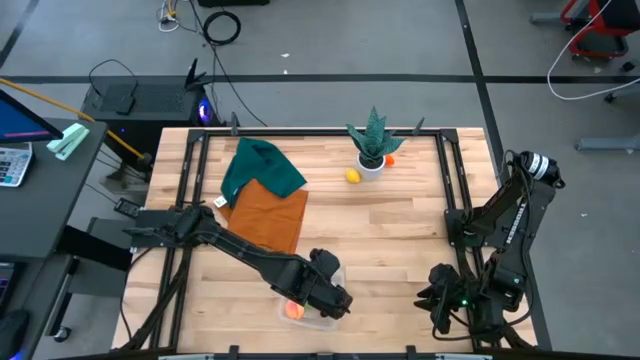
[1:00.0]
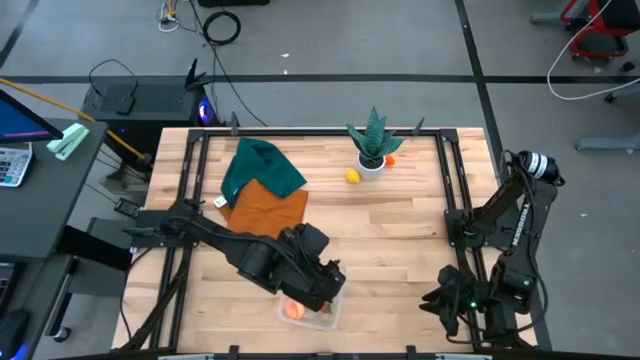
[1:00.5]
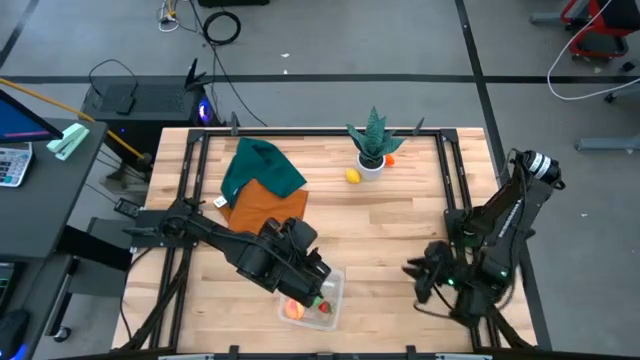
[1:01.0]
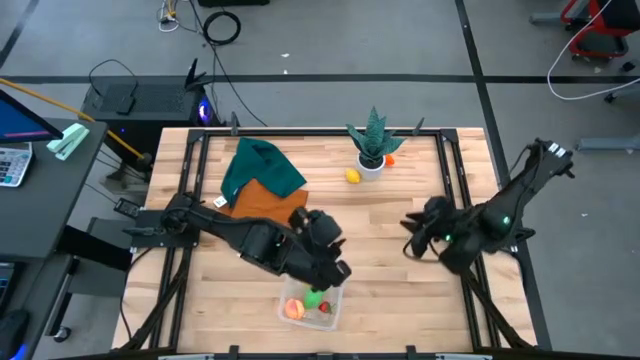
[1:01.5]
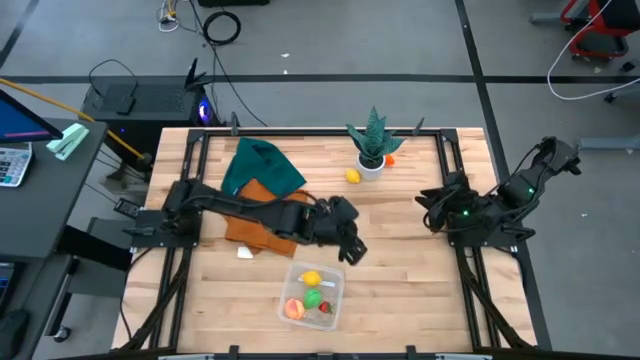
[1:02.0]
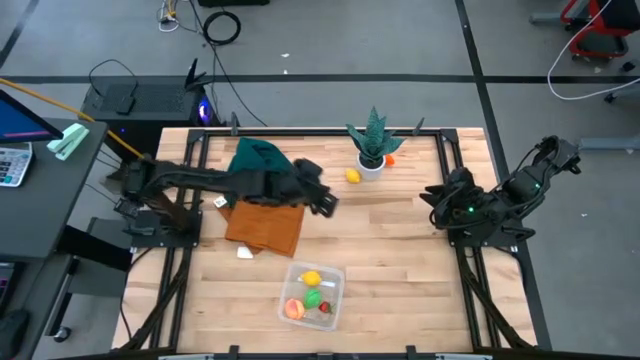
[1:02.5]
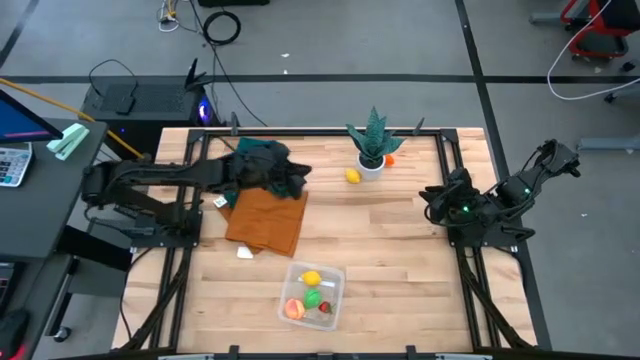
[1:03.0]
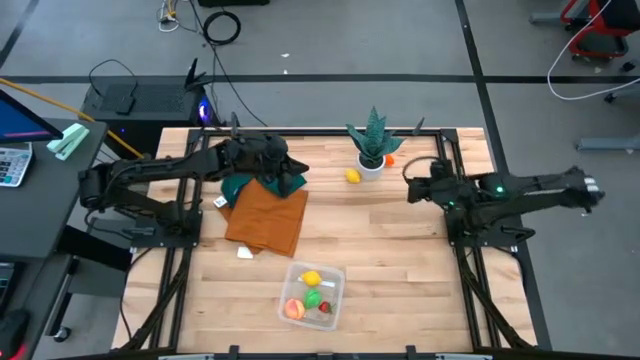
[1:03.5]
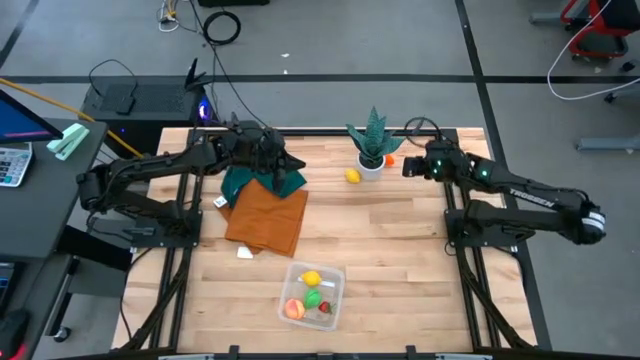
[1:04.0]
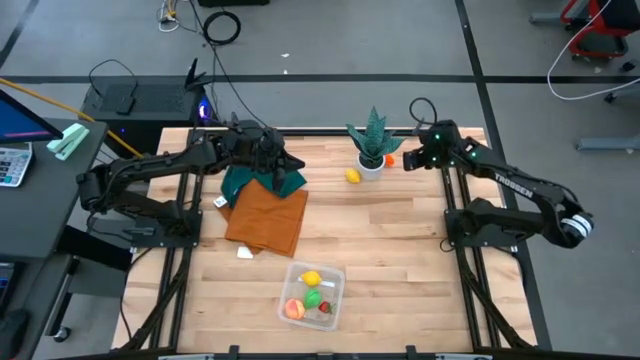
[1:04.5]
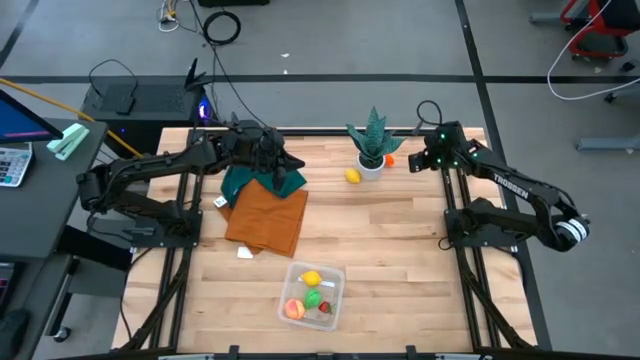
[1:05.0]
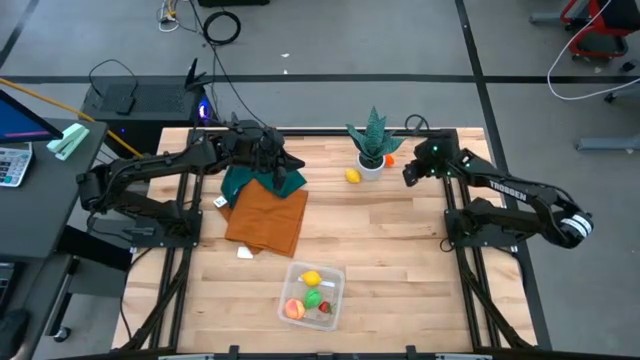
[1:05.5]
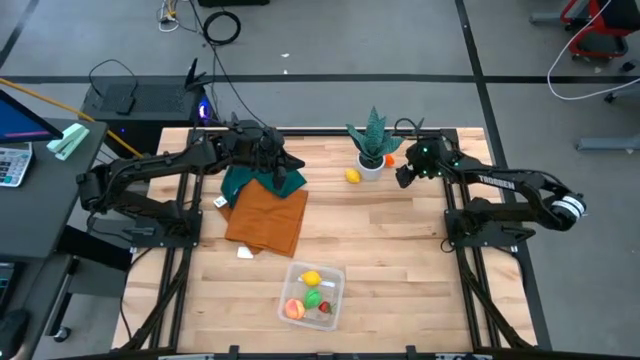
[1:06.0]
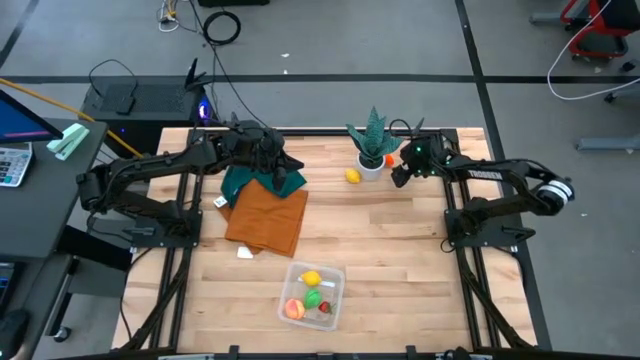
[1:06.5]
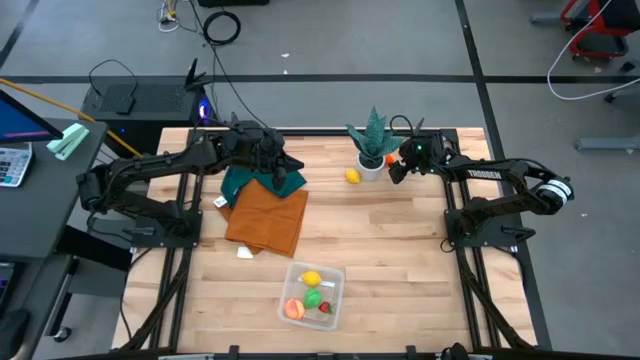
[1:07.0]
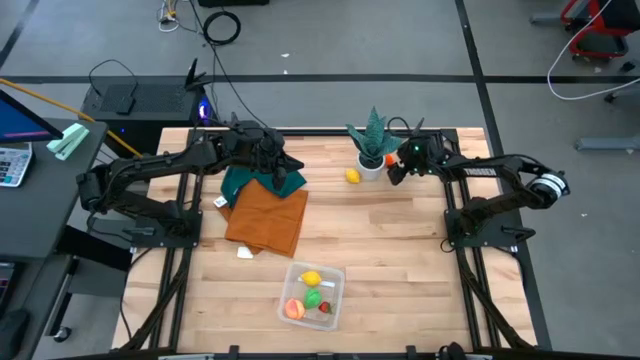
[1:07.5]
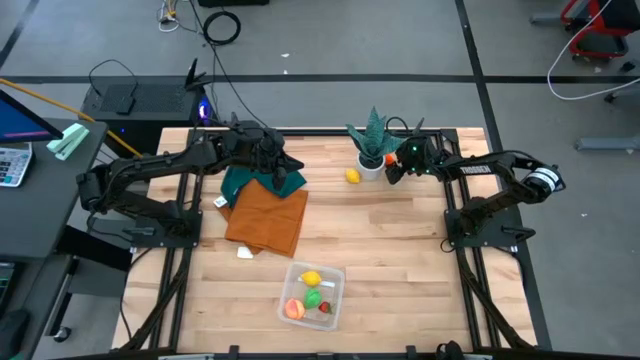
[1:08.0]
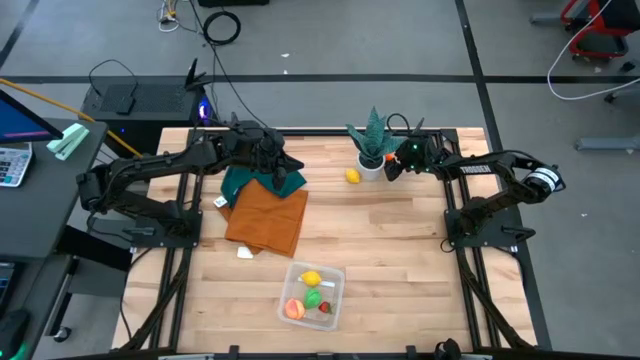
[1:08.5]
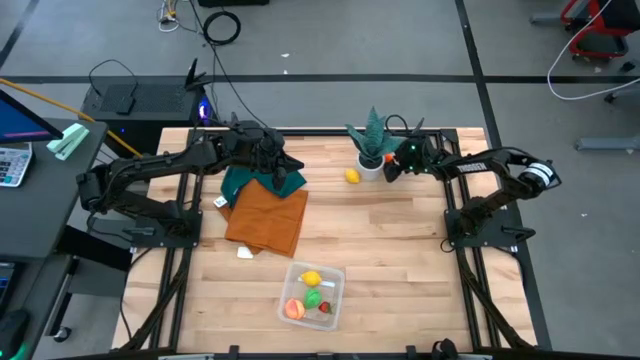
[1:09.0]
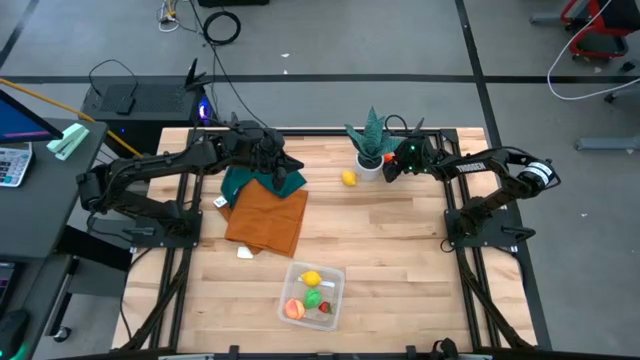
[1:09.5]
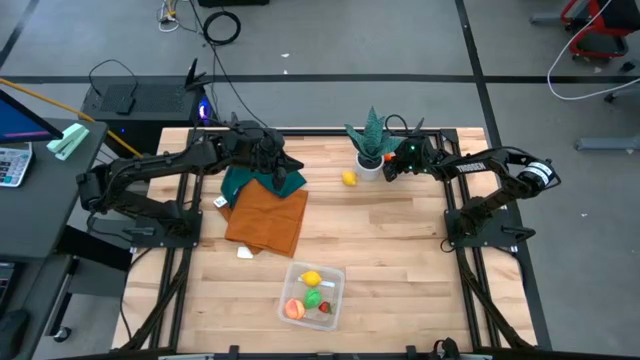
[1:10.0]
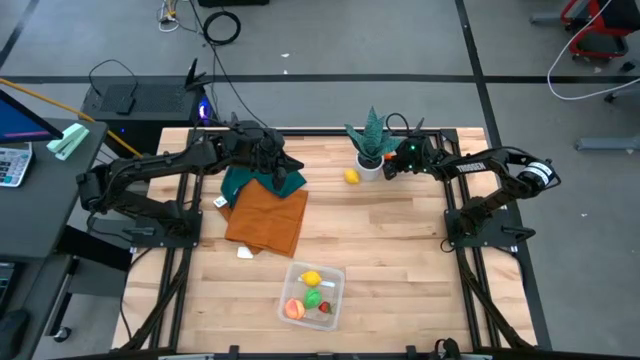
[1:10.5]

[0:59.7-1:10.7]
Task: Pick and placing Produce into tupperware
Put the orange carrot into the transparent bin

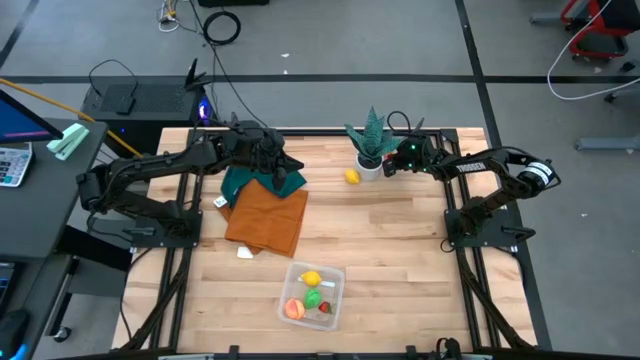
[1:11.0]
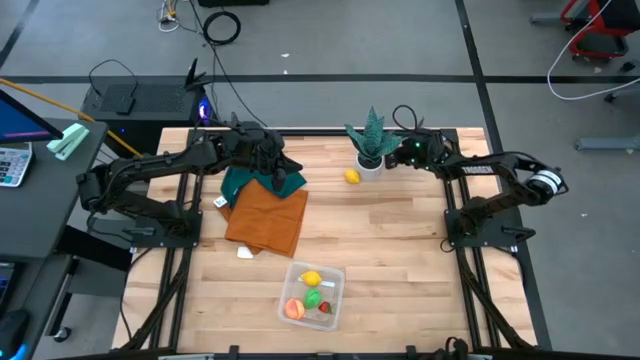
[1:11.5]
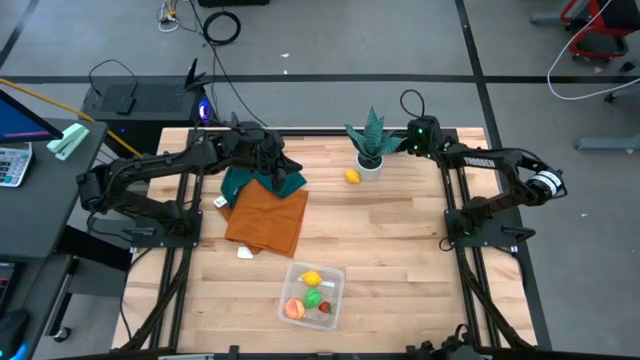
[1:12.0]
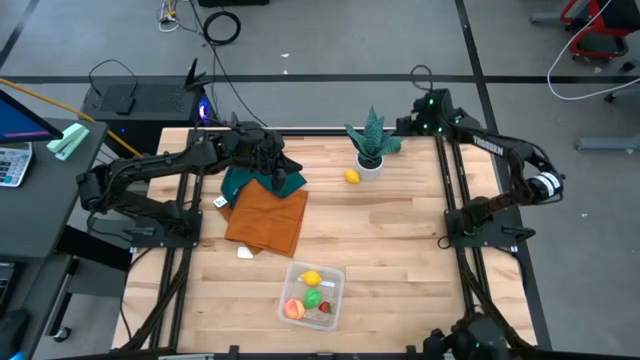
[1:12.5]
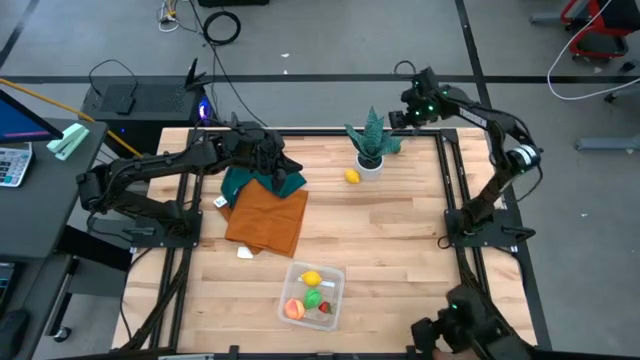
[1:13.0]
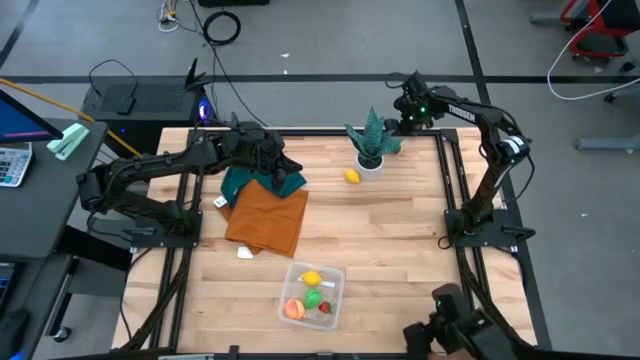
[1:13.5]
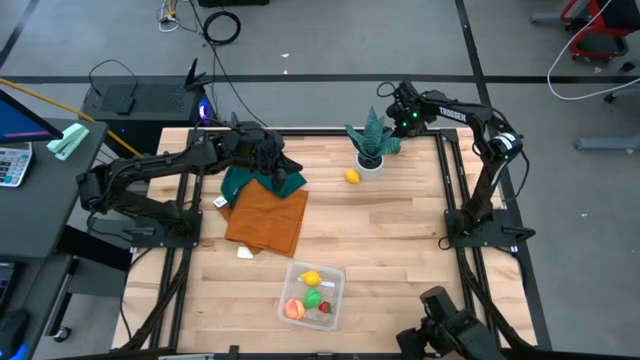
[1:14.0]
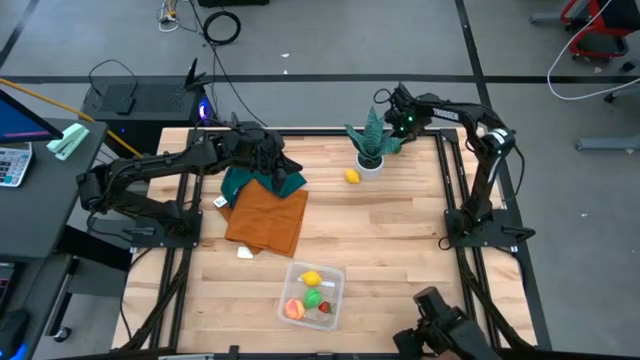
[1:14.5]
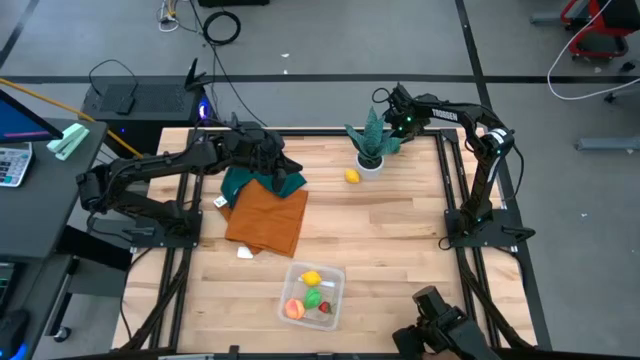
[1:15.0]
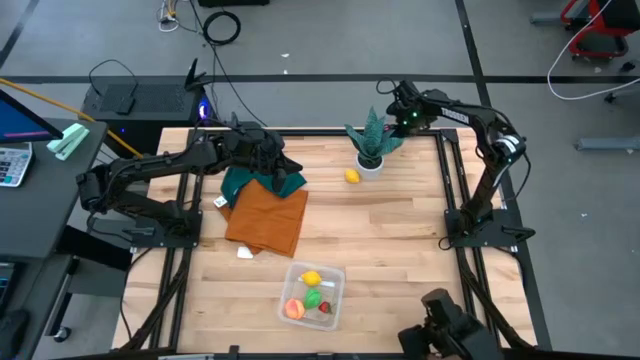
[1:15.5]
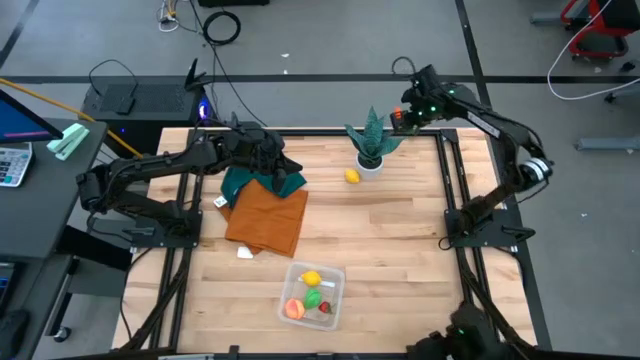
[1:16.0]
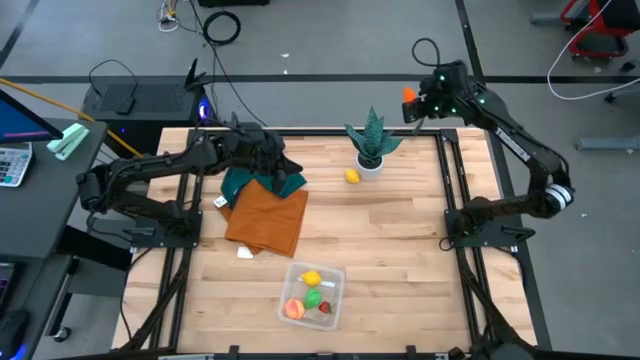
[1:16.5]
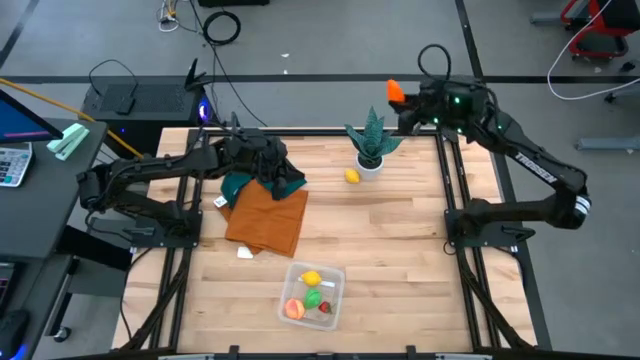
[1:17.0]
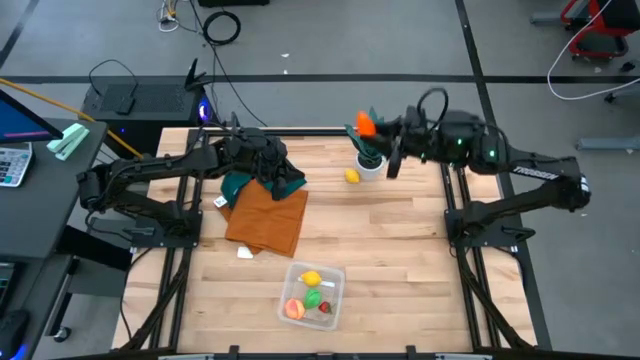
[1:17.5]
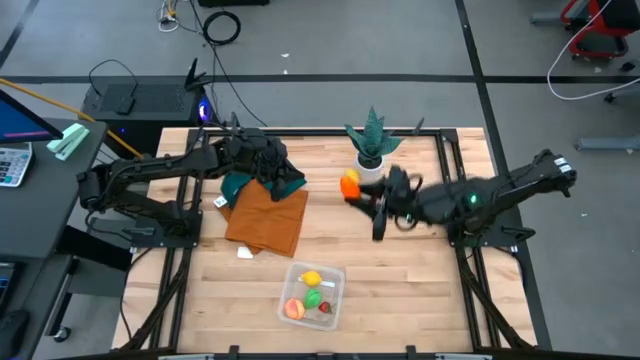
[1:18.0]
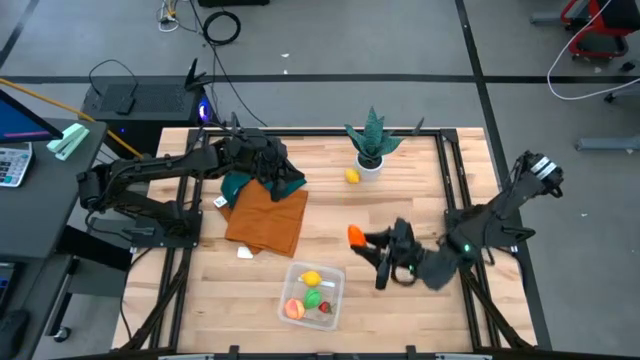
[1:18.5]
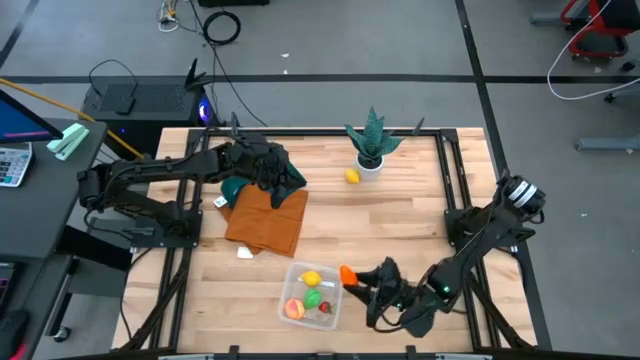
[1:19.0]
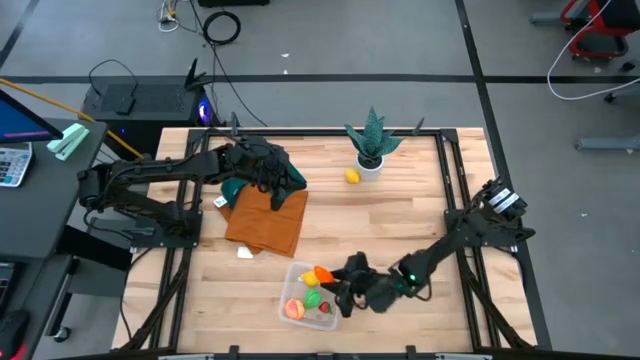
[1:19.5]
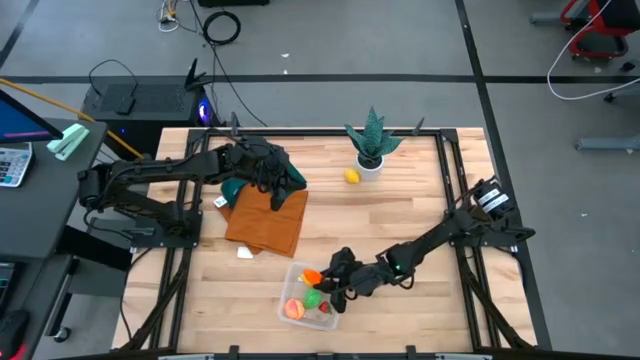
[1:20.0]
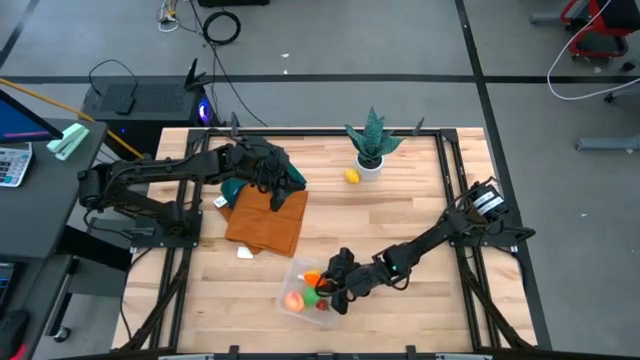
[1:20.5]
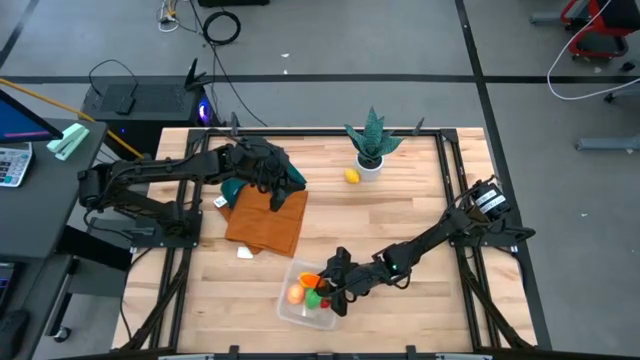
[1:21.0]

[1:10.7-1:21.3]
Put the orange carrot into the transparent bin

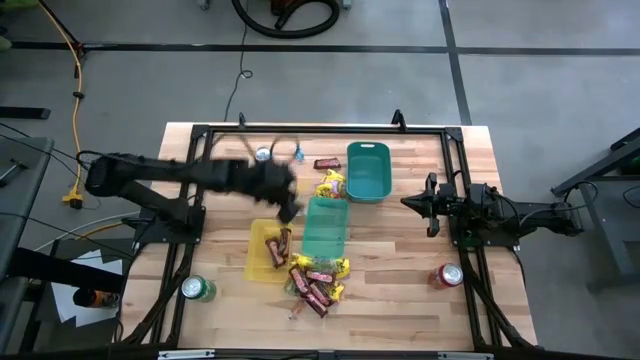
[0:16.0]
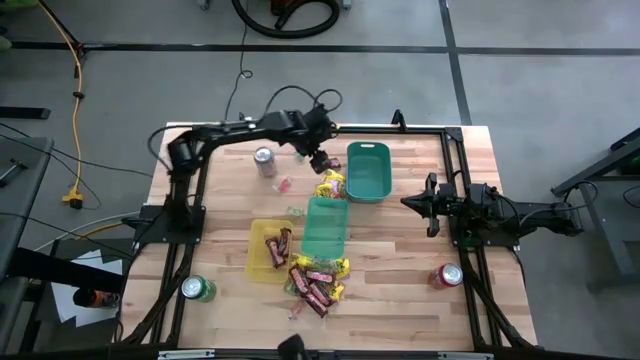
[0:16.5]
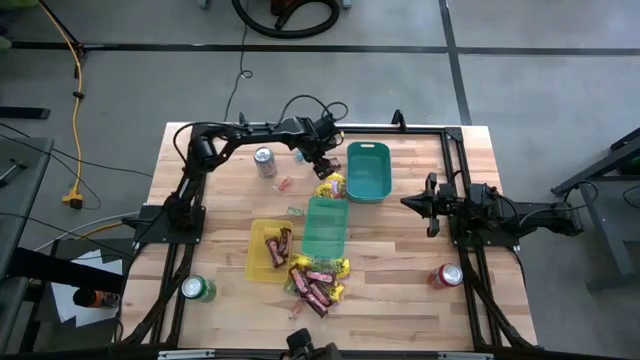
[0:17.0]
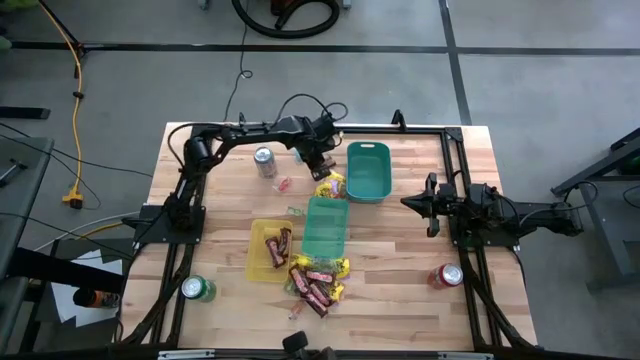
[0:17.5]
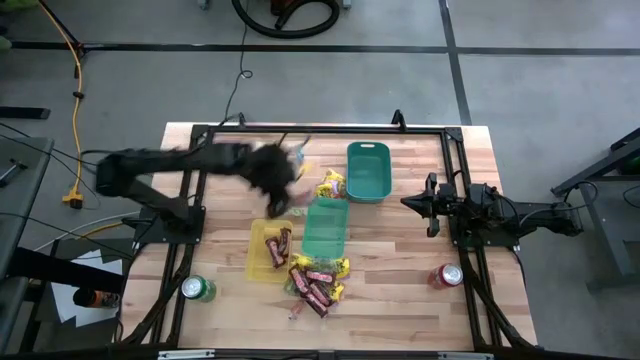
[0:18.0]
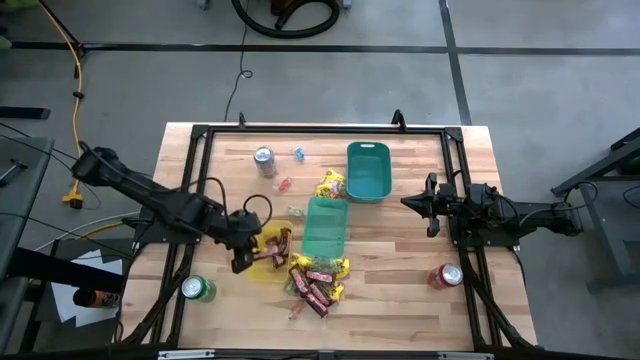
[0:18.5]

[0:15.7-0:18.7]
Task: Sort candy
Put the brown chocolate bar into the yellow bin
